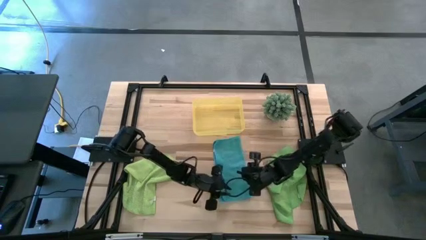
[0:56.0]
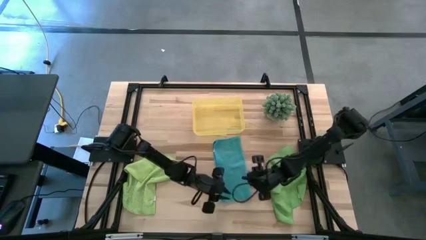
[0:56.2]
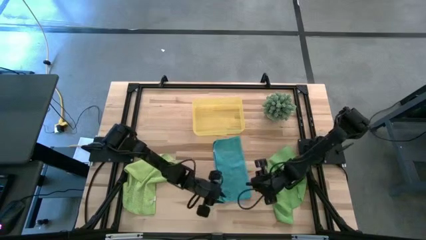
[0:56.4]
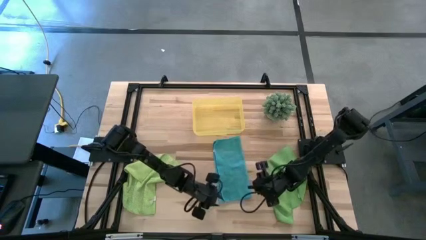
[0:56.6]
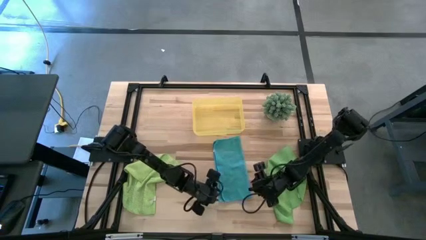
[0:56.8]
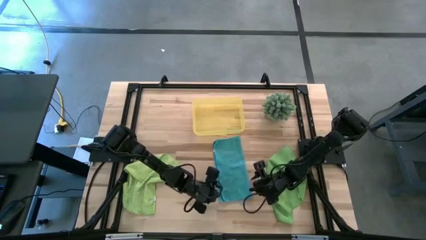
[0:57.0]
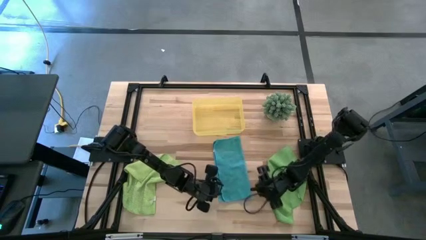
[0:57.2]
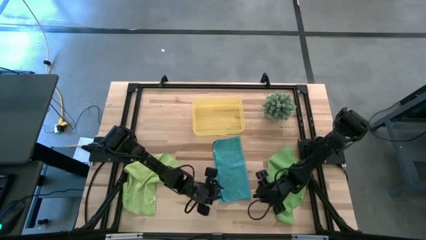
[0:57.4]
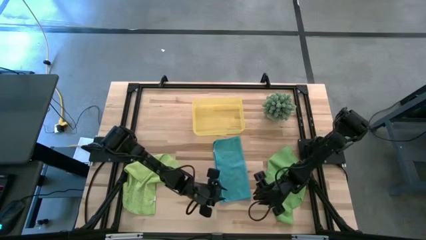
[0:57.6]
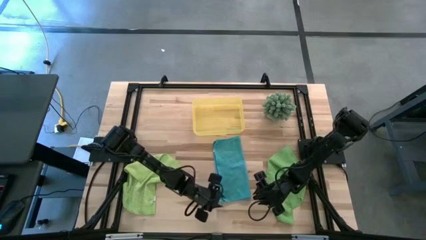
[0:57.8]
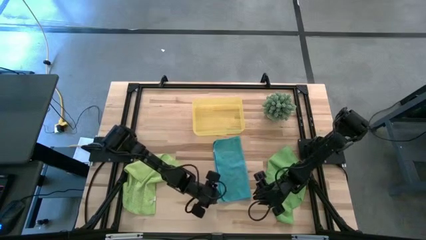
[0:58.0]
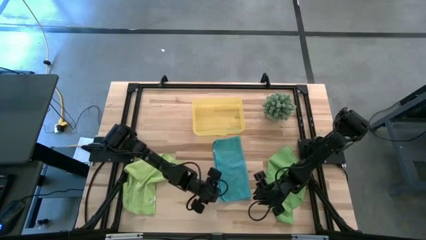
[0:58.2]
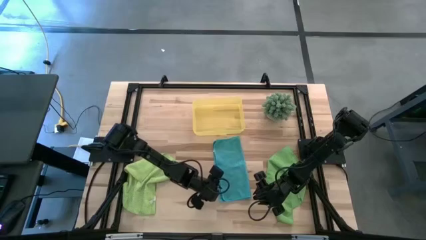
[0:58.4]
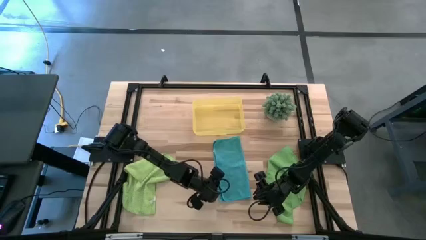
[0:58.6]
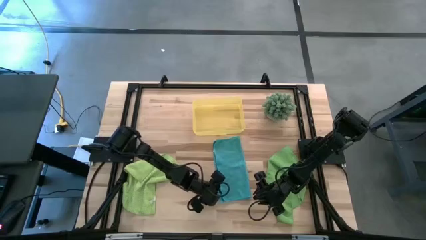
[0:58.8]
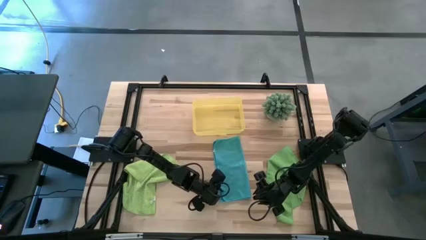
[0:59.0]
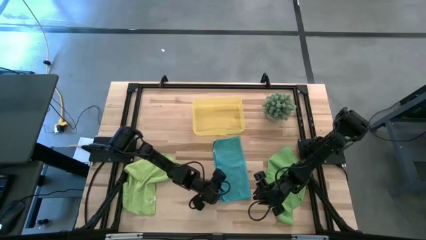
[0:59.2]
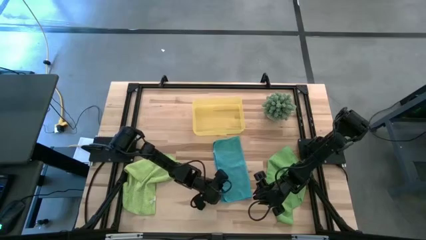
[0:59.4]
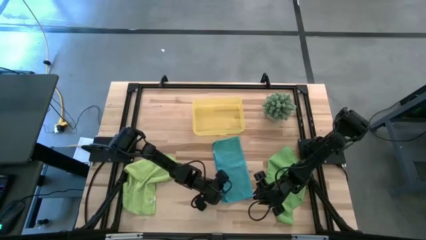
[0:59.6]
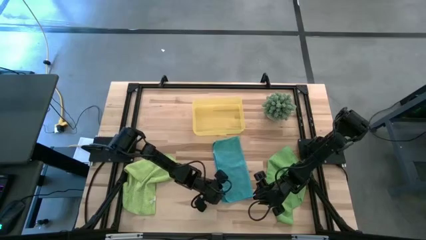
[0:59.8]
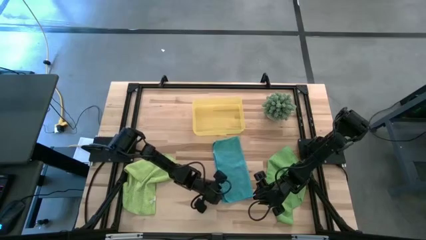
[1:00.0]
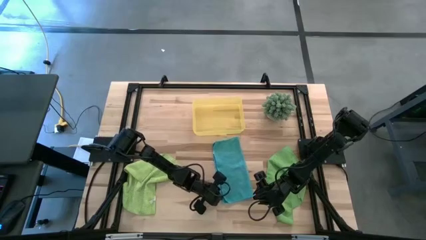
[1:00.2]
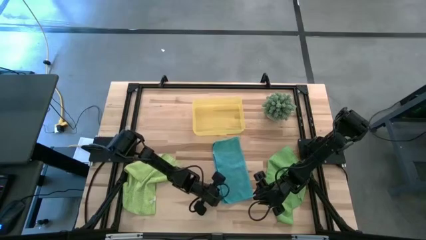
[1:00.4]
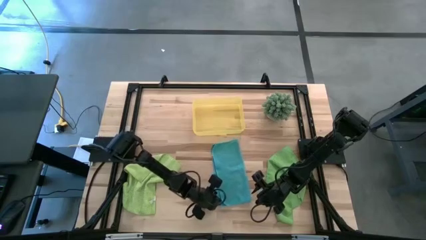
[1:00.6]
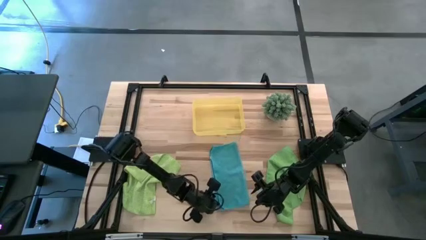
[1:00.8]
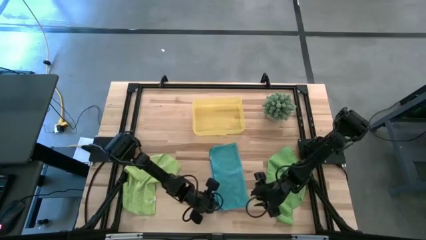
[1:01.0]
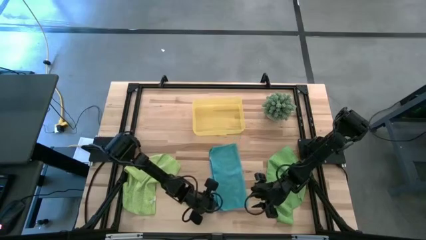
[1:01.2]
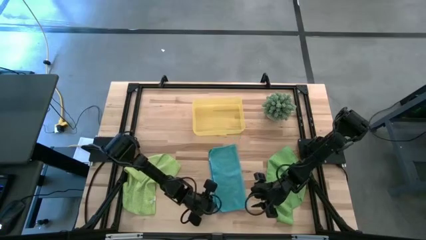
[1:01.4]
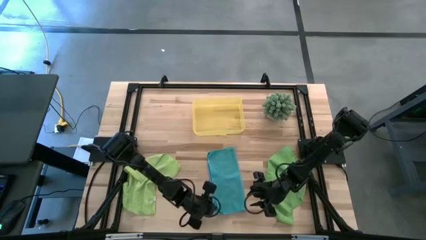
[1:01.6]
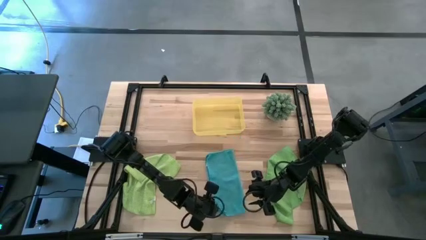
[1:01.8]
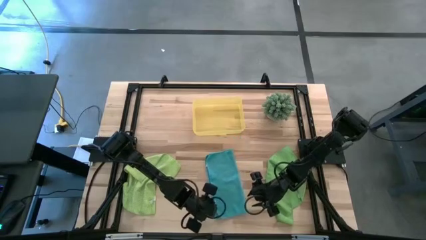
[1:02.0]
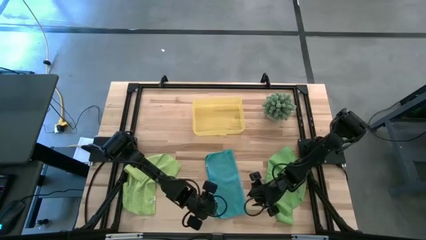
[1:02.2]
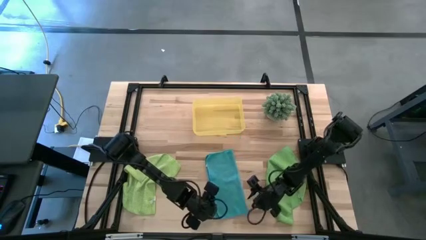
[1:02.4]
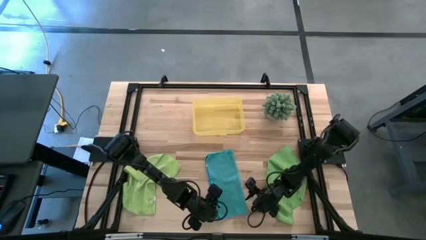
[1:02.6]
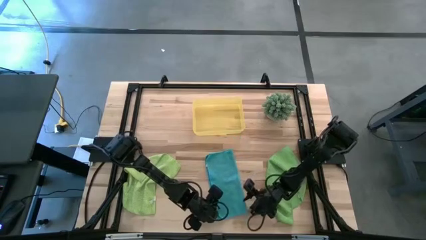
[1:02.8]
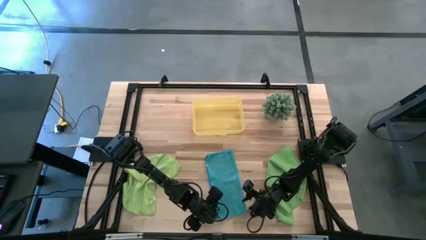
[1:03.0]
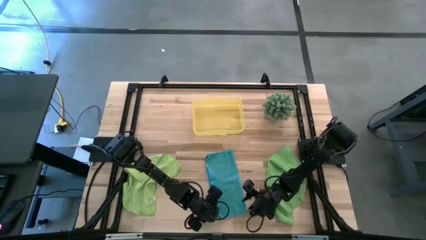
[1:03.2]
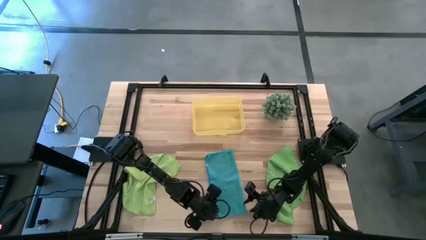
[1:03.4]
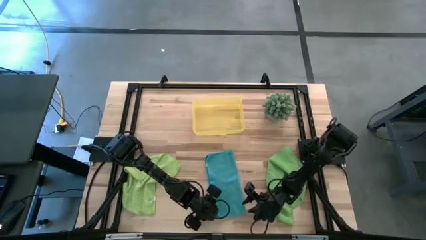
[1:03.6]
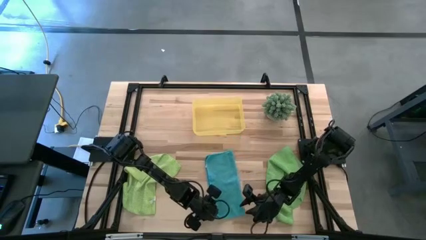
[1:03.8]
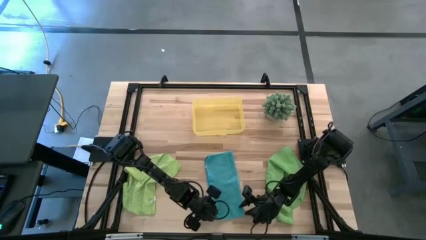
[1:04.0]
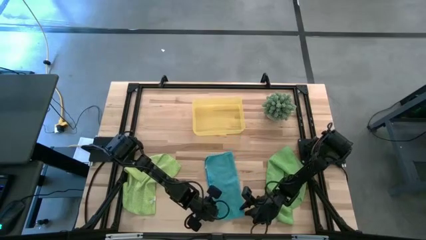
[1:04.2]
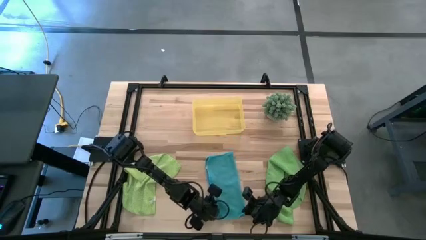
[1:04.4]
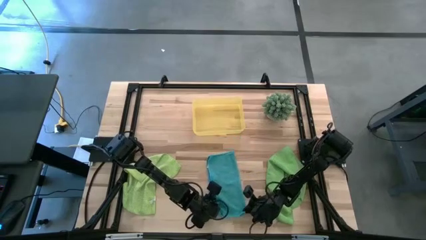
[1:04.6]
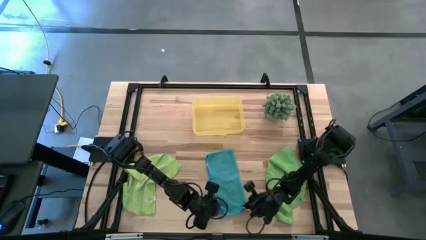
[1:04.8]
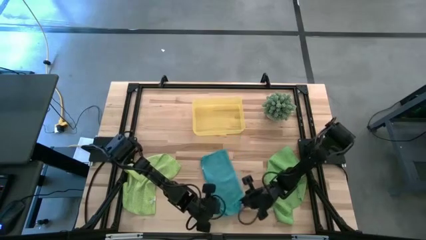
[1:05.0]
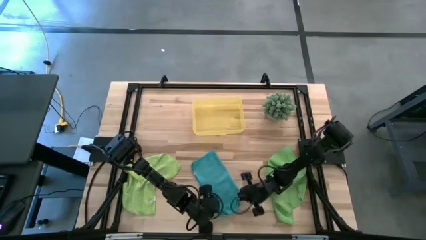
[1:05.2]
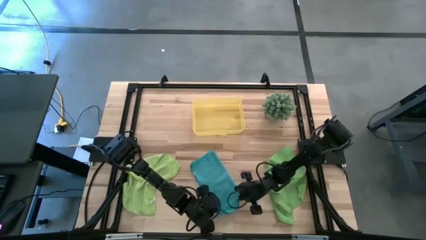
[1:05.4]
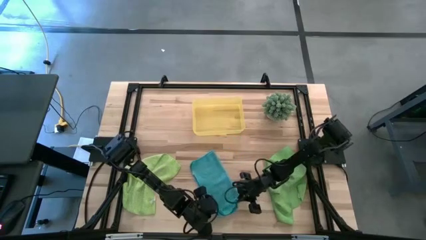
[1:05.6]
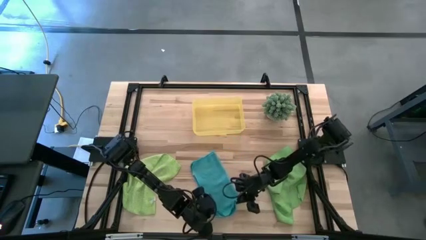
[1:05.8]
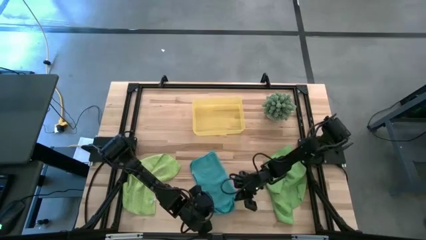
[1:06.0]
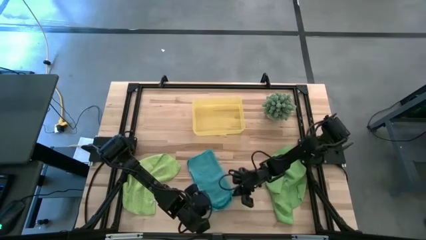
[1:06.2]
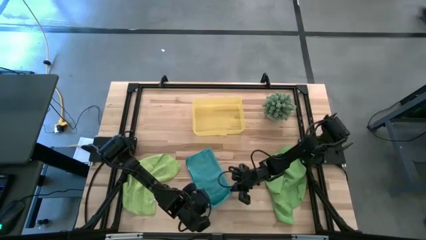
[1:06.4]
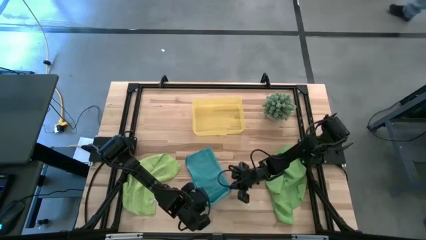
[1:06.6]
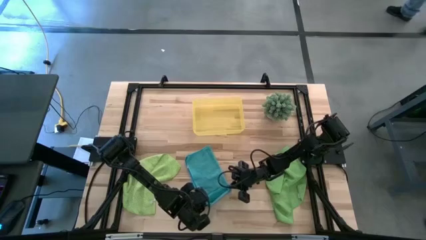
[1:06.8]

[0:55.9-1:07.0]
Task: Roll microfiber towels into tight, uniform cylinder then place into a basket
Roll the blue microfiber cloth
